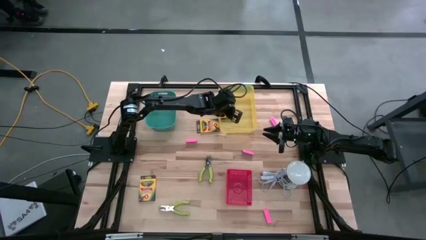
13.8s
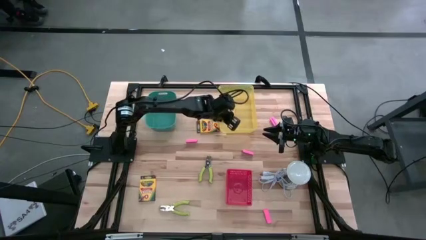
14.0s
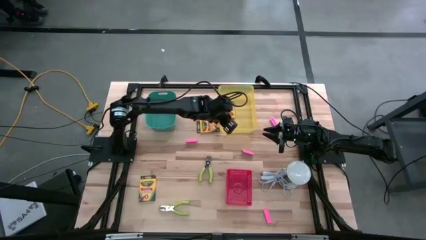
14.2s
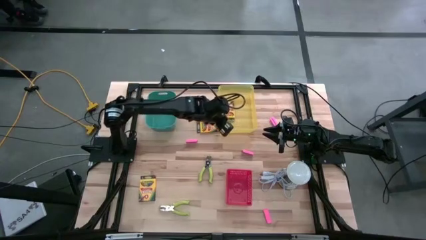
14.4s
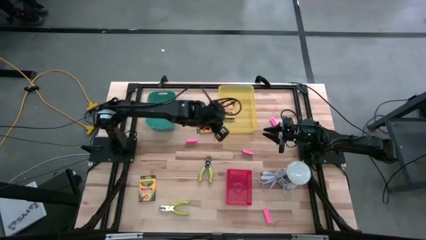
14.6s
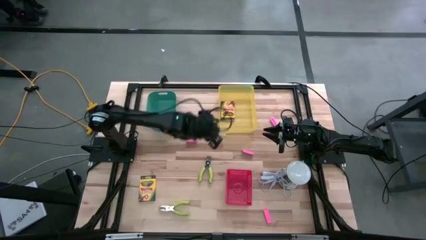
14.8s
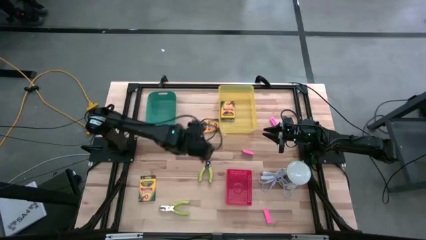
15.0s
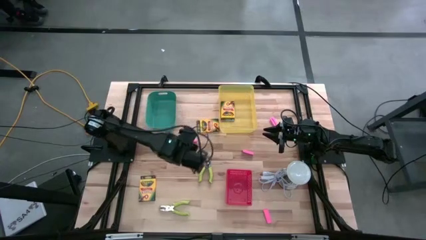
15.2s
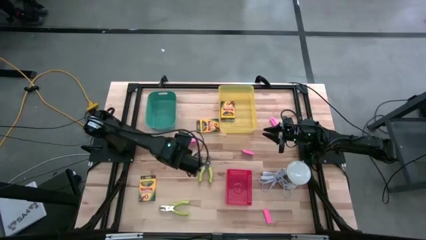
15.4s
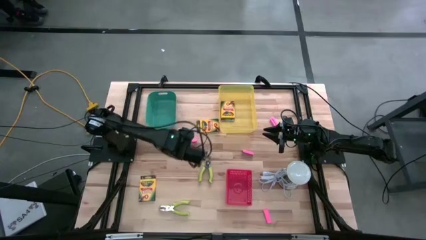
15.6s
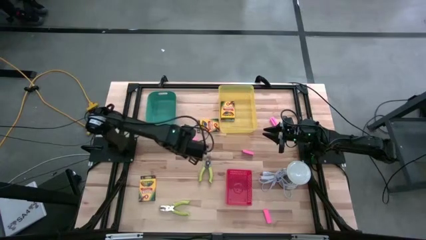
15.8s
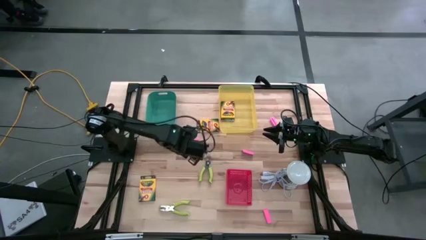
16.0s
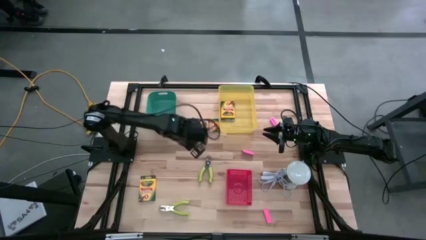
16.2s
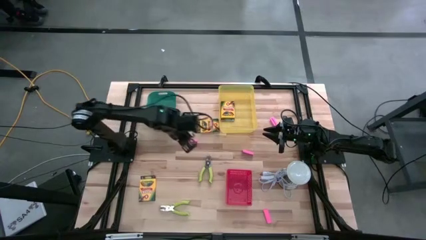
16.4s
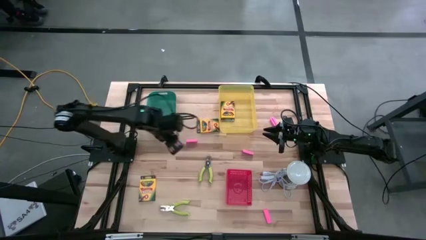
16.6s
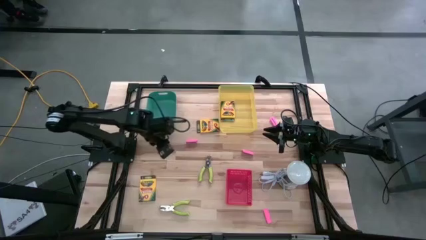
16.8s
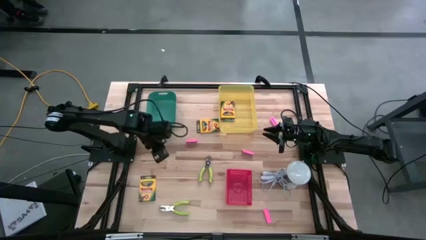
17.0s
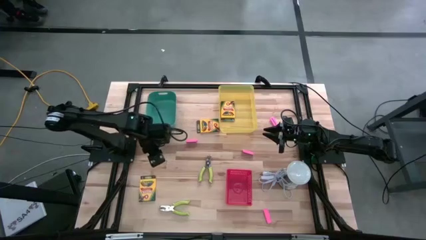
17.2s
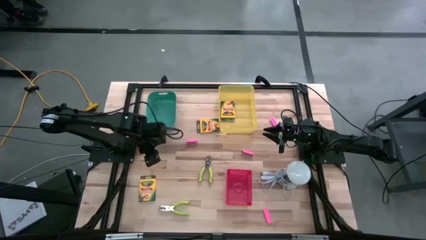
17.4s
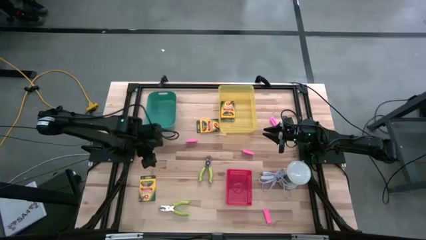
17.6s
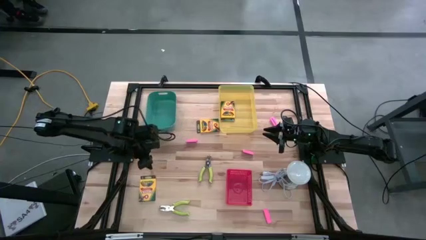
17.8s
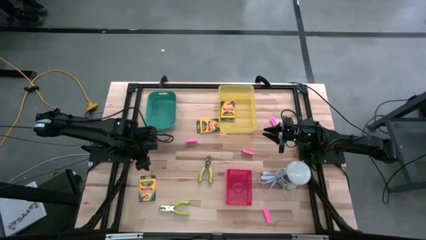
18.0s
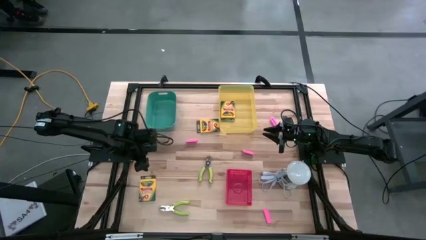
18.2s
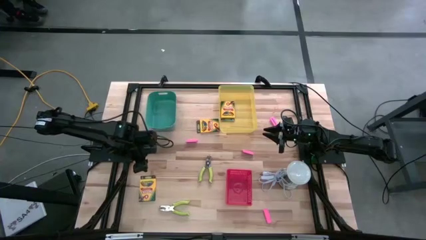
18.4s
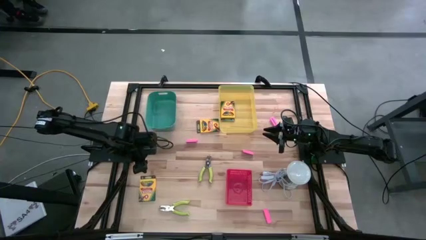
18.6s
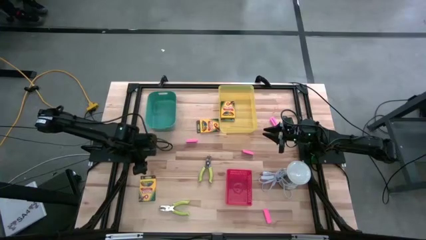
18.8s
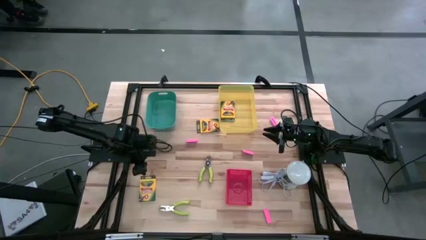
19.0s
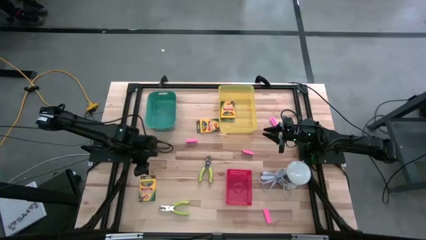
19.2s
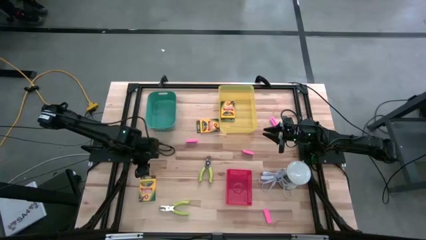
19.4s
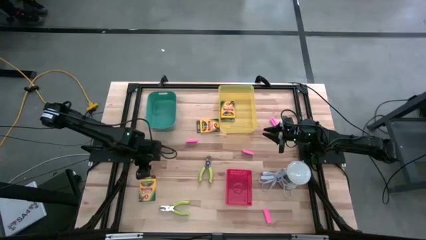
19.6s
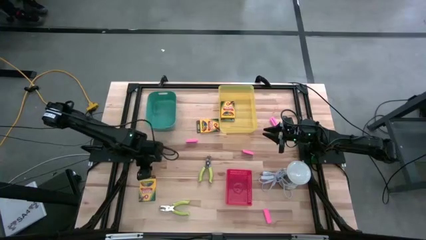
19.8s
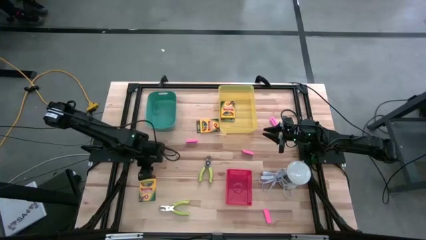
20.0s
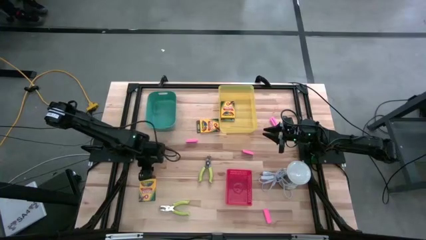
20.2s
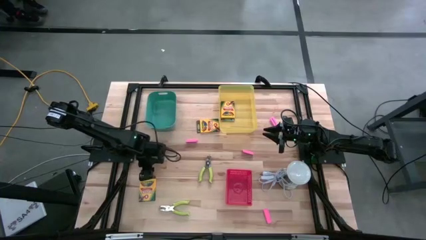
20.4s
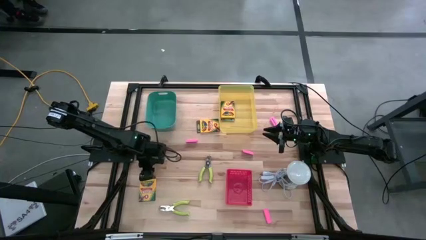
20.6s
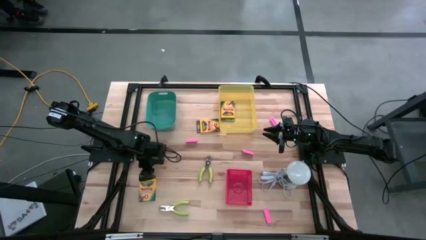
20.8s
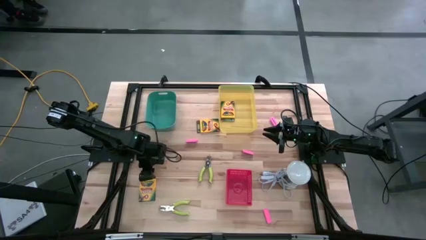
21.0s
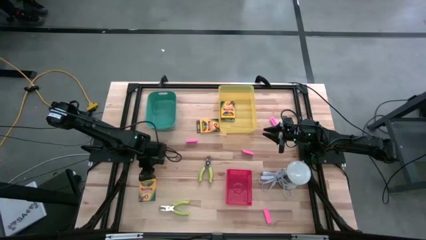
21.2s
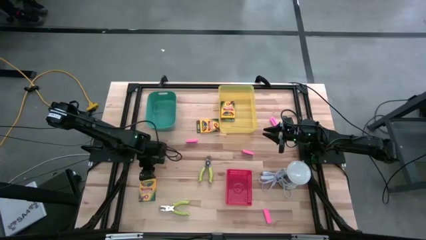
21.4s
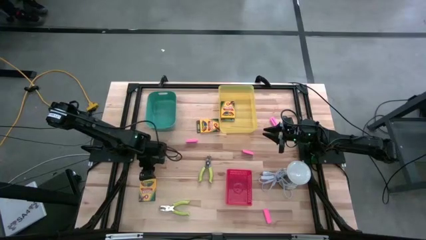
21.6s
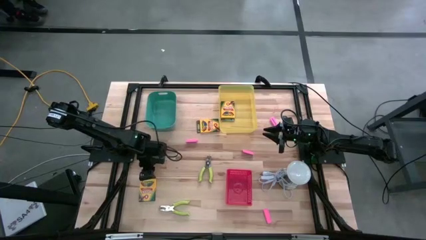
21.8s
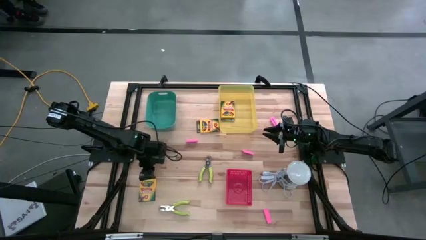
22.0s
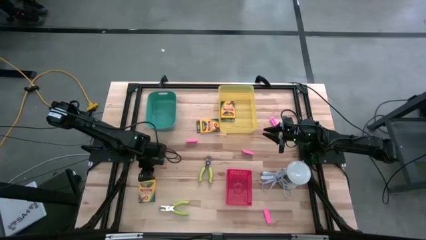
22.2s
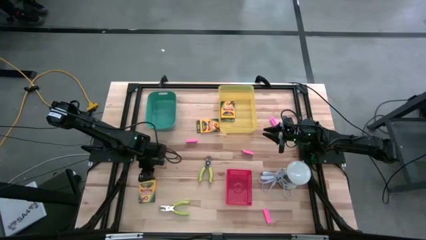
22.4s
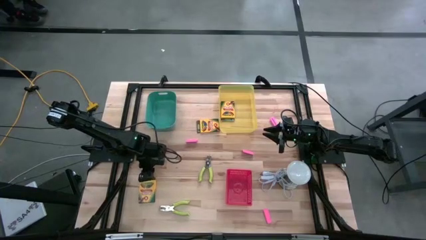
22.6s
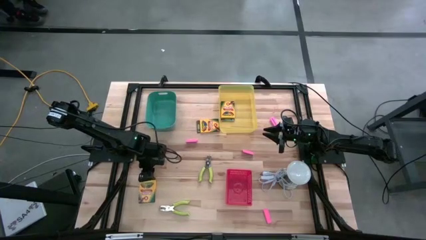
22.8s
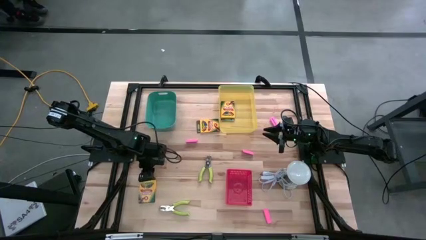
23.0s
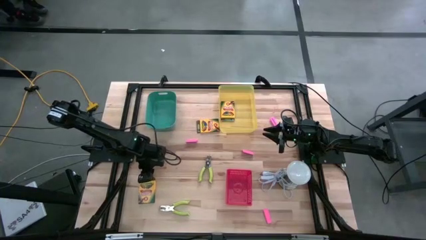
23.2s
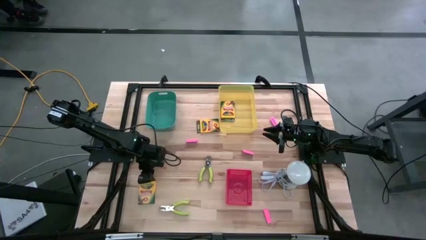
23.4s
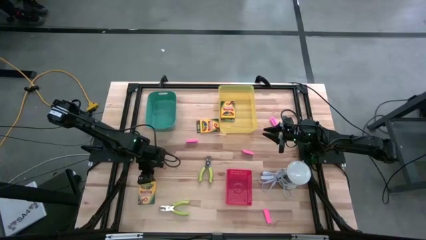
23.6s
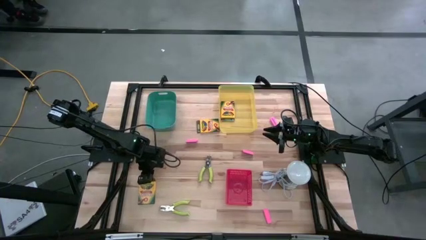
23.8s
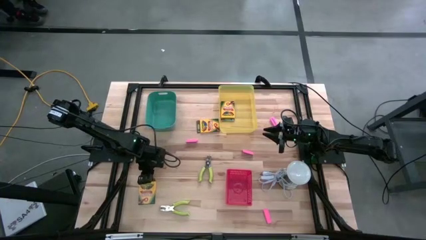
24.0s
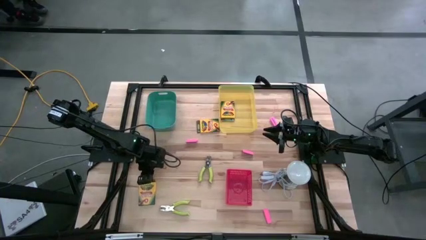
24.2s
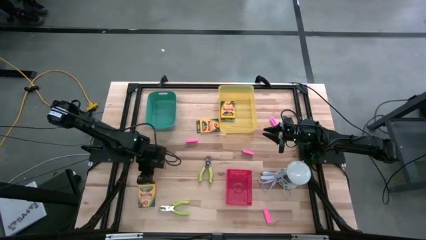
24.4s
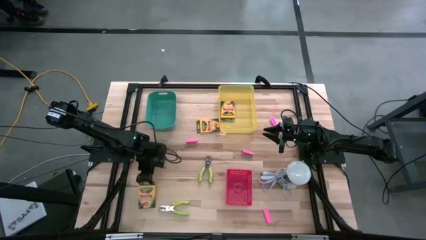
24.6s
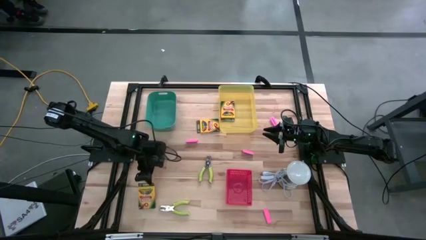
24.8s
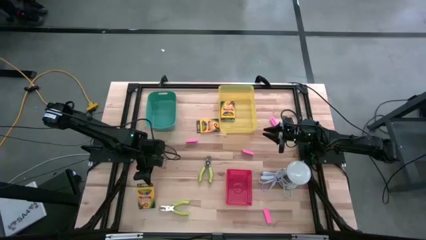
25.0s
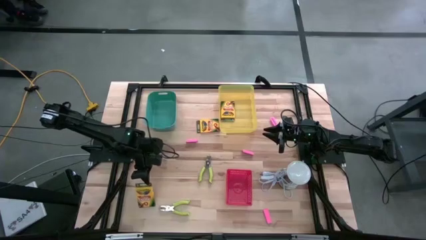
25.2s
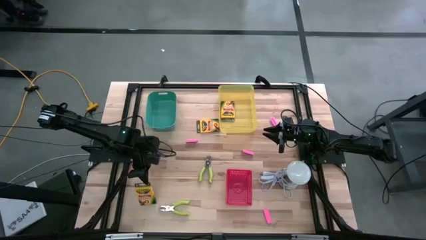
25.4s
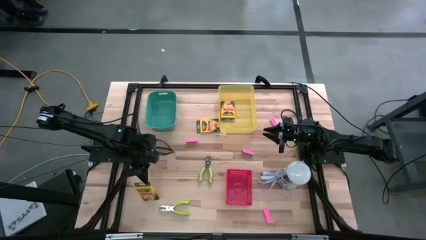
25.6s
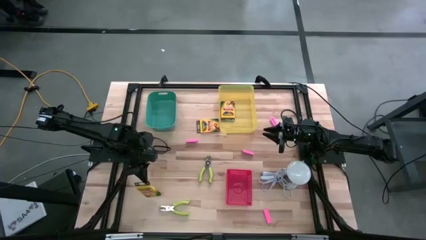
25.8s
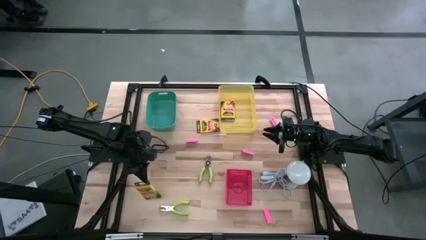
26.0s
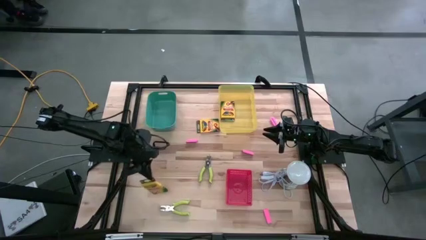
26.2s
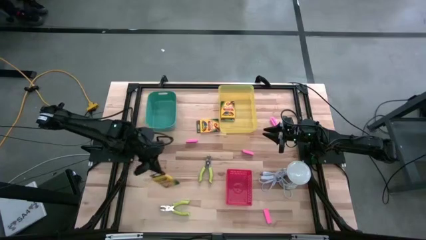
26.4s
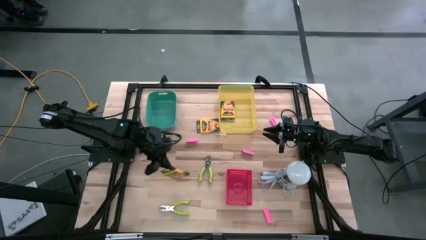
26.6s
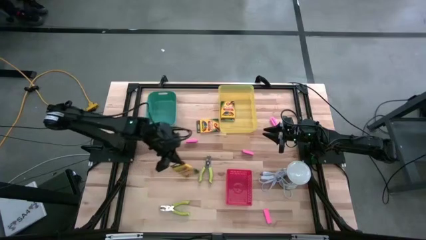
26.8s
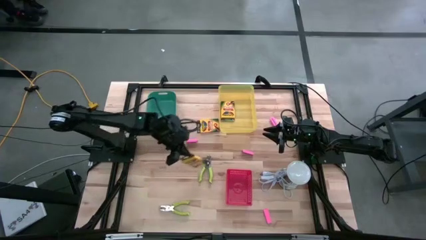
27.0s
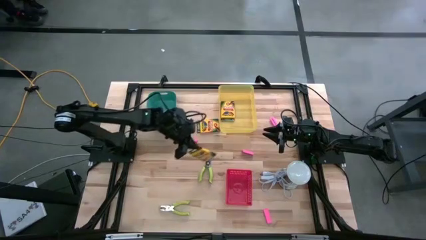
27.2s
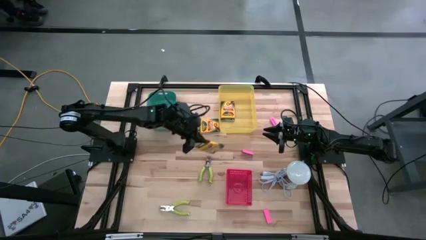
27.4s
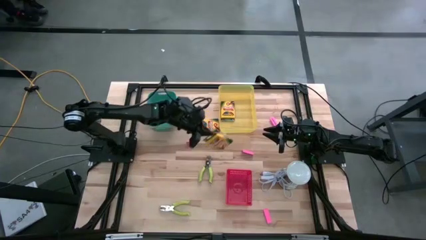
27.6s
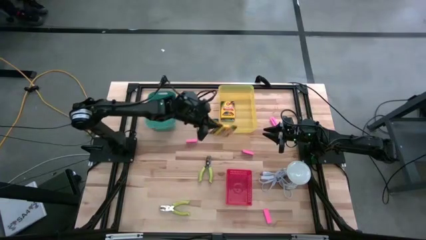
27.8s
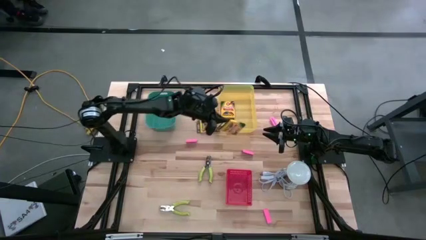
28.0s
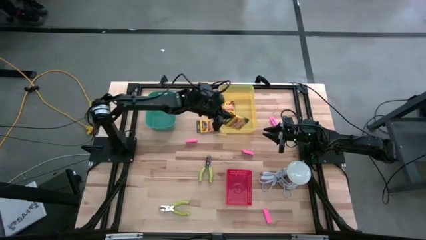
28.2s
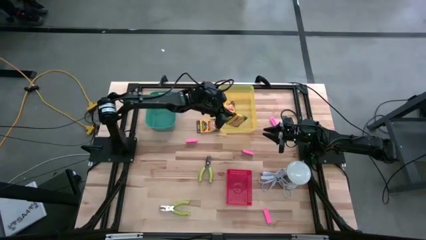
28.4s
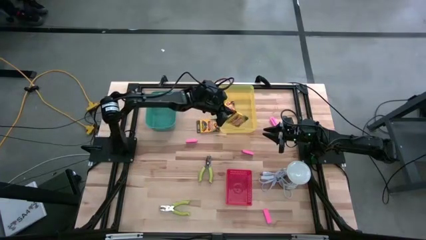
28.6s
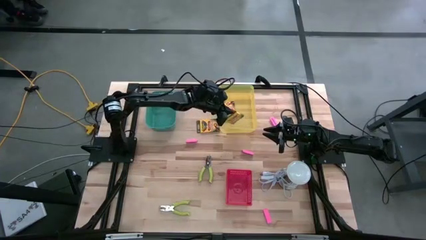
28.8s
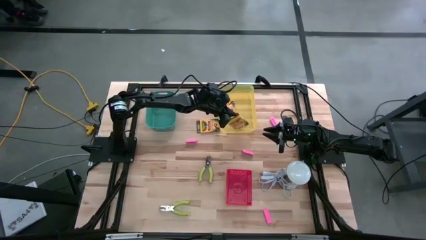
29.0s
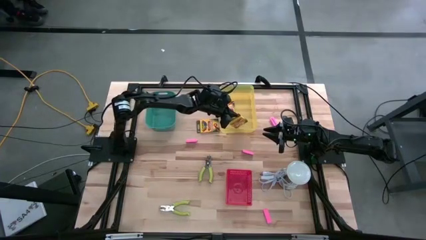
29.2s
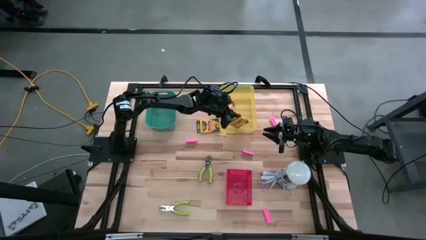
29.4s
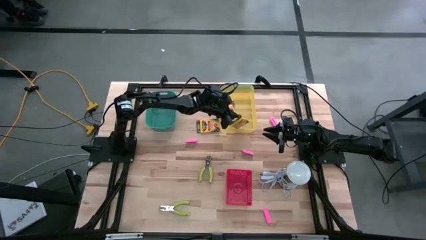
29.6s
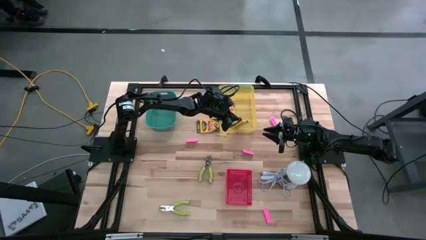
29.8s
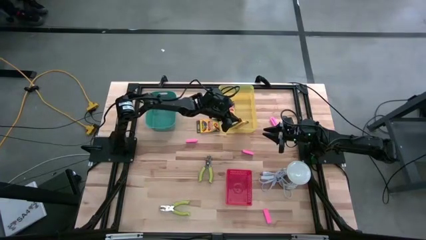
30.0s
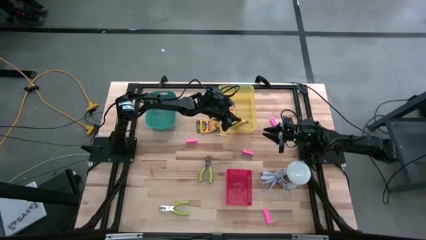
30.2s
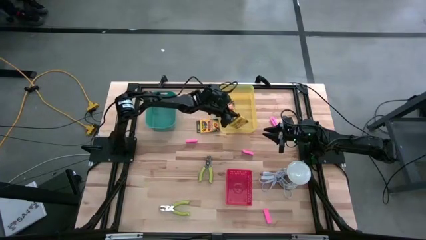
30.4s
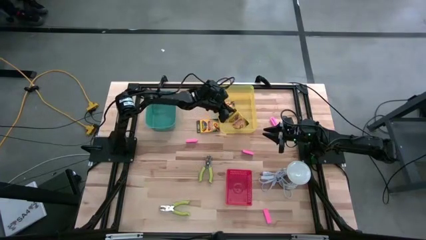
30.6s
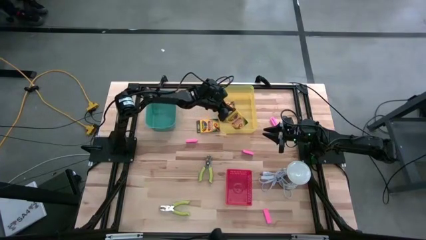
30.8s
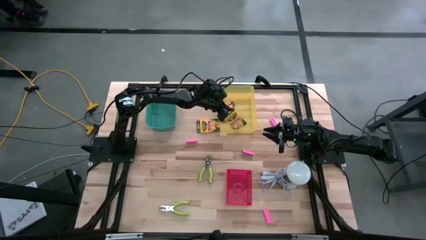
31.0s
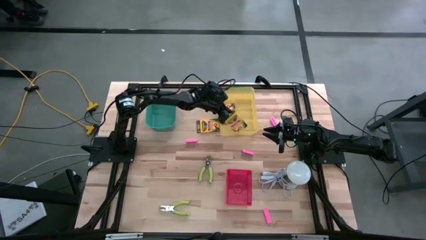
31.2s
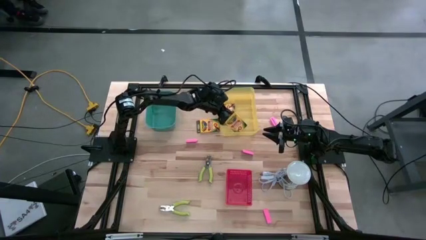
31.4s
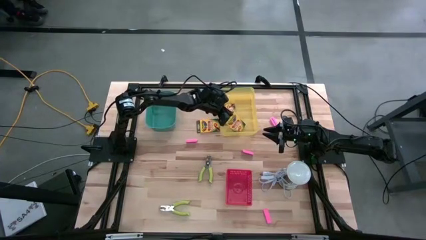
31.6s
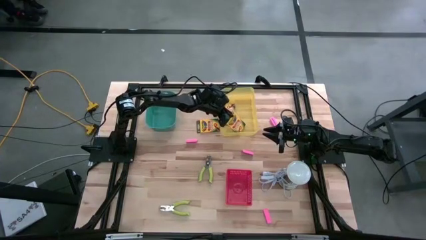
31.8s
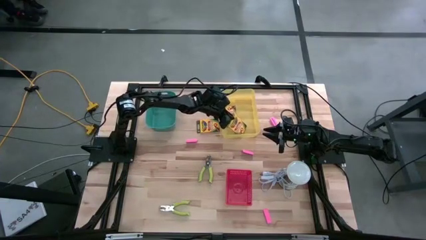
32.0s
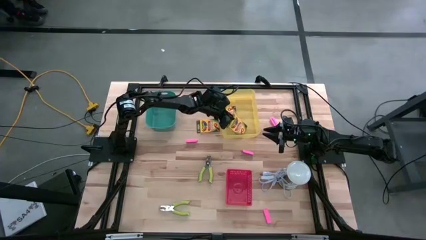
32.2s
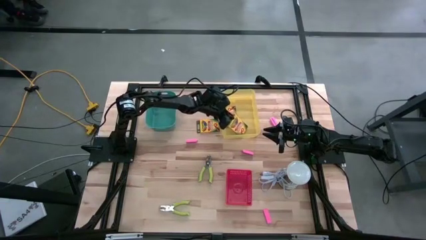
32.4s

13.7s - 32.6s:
Task: Pick & Place School Supplies
Put the crayon box into the yellow bin
